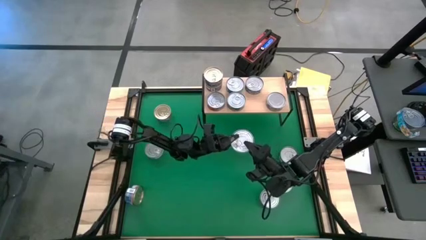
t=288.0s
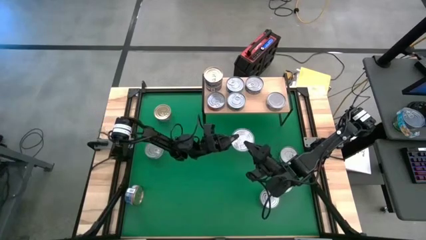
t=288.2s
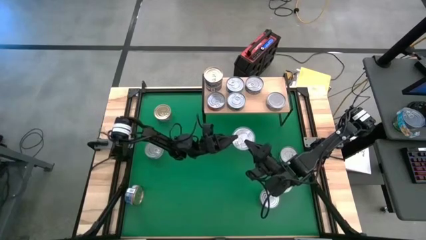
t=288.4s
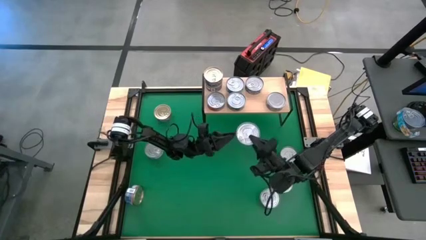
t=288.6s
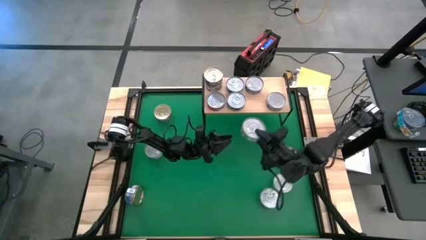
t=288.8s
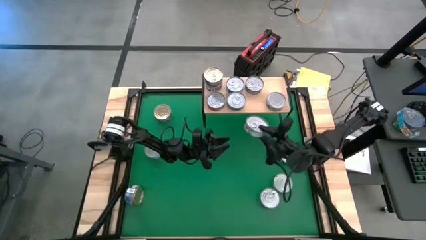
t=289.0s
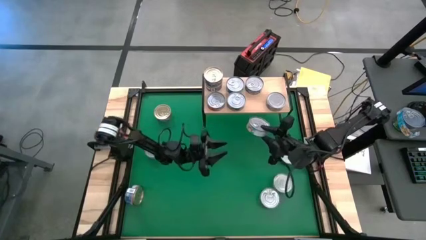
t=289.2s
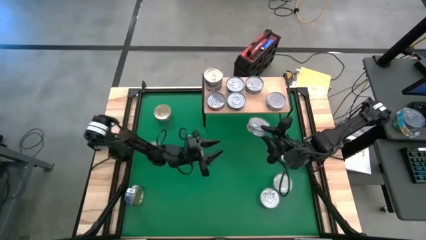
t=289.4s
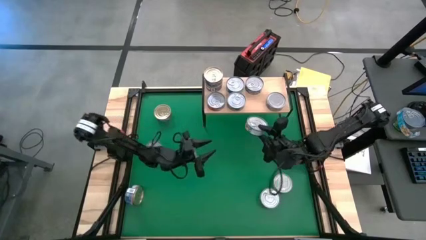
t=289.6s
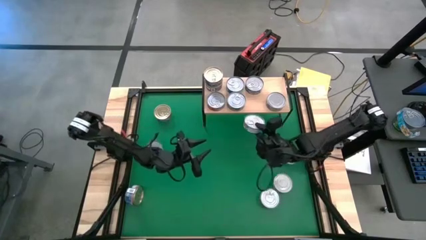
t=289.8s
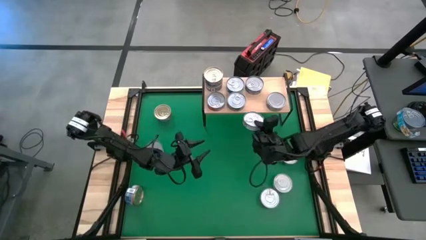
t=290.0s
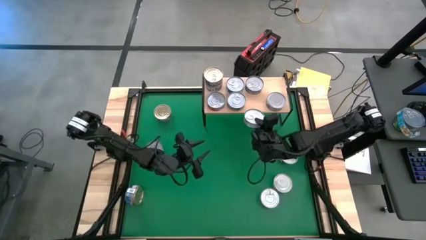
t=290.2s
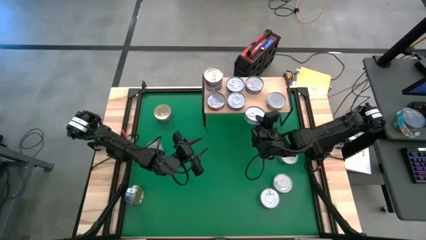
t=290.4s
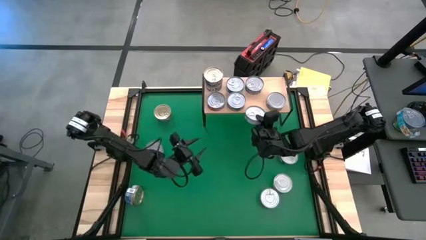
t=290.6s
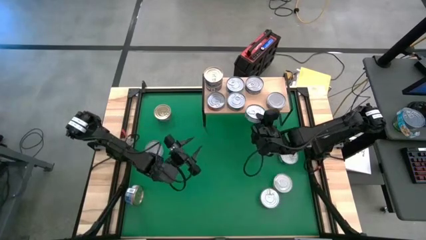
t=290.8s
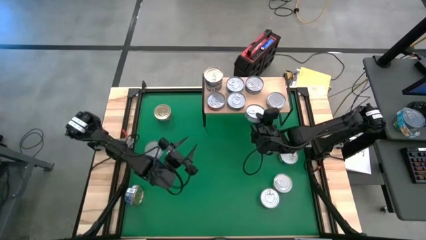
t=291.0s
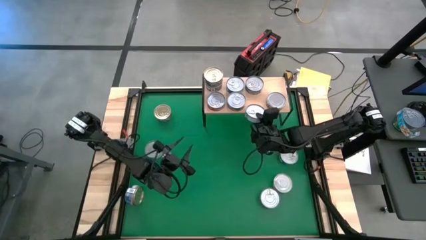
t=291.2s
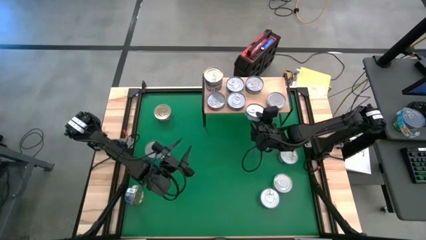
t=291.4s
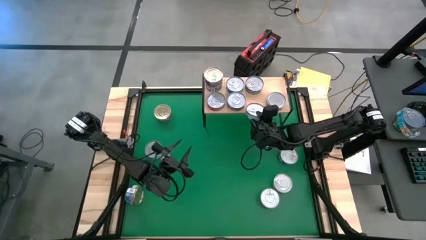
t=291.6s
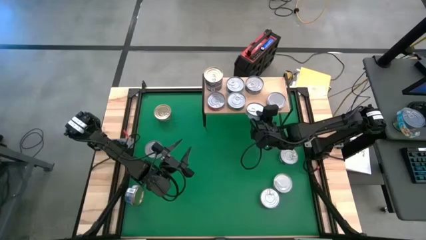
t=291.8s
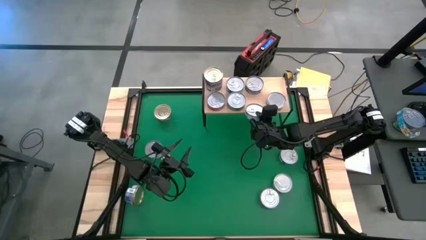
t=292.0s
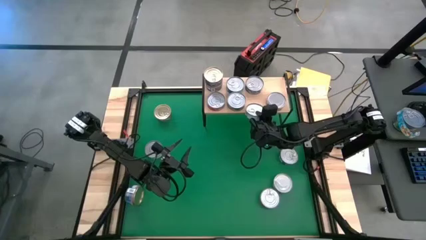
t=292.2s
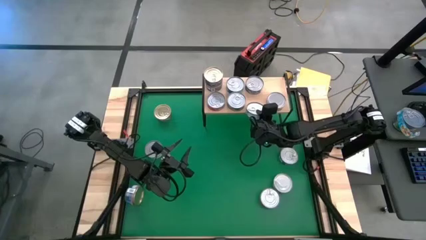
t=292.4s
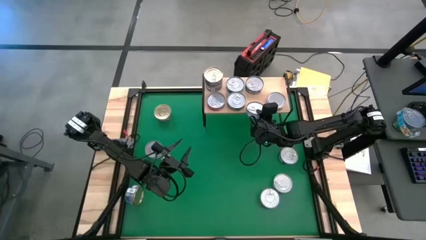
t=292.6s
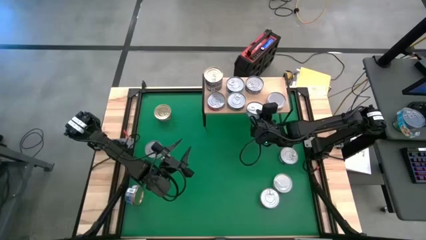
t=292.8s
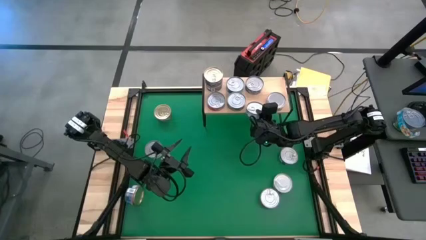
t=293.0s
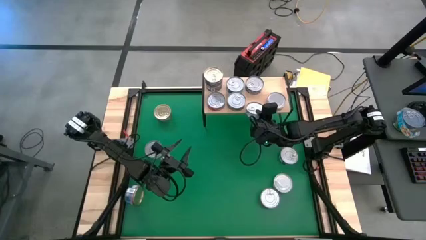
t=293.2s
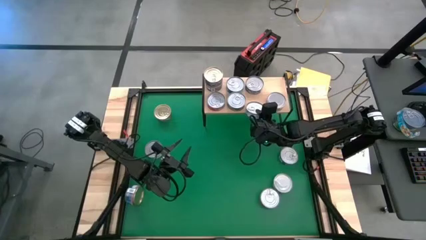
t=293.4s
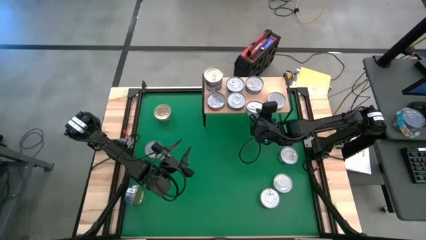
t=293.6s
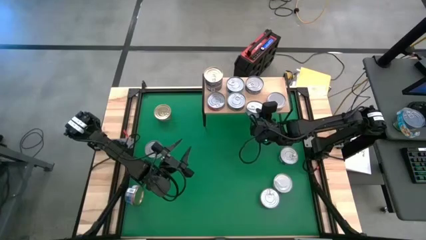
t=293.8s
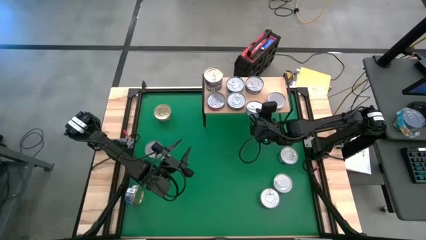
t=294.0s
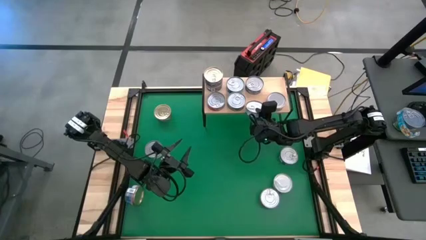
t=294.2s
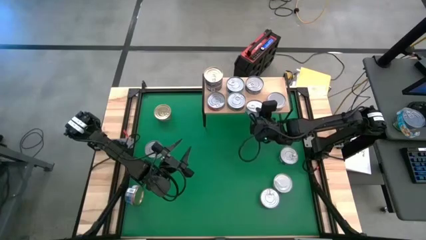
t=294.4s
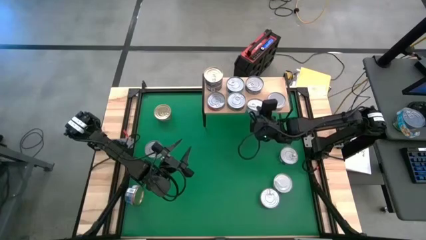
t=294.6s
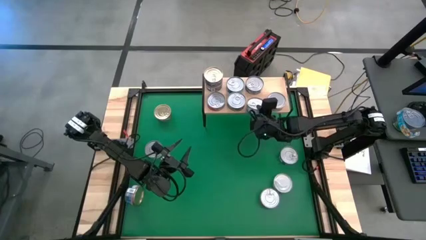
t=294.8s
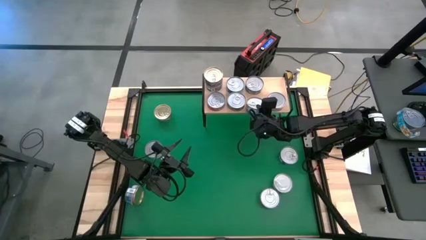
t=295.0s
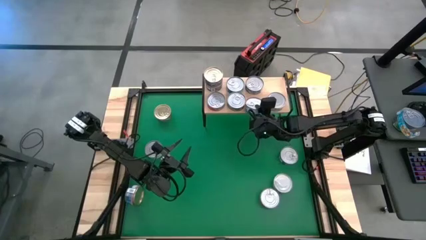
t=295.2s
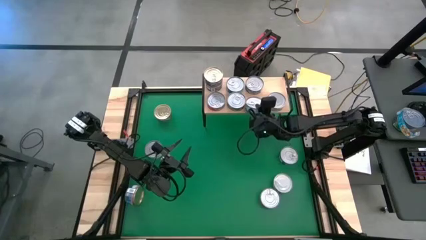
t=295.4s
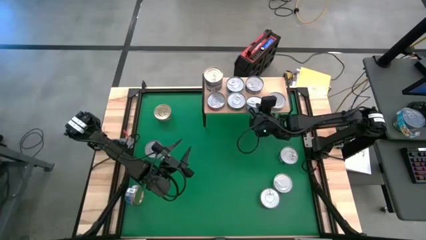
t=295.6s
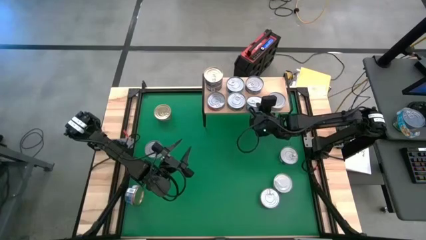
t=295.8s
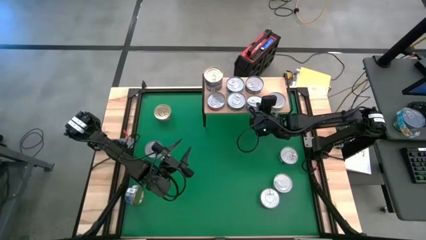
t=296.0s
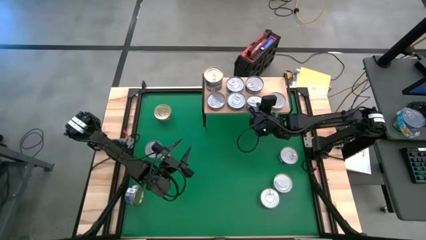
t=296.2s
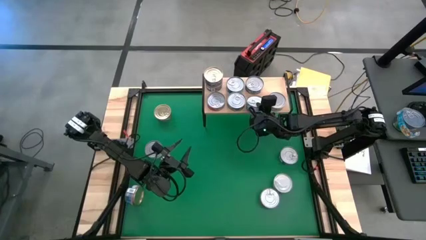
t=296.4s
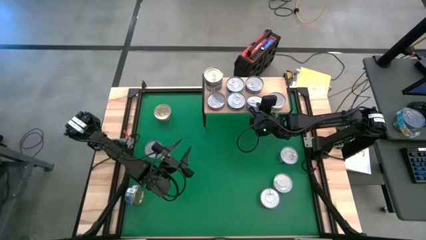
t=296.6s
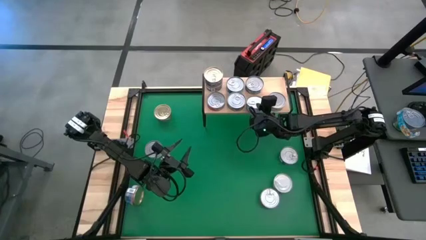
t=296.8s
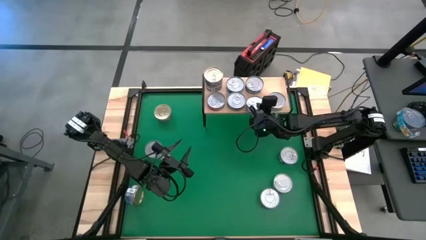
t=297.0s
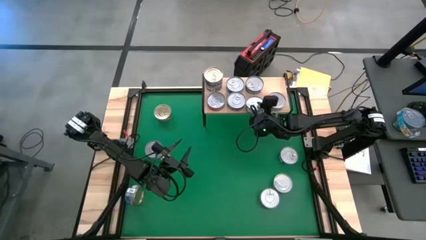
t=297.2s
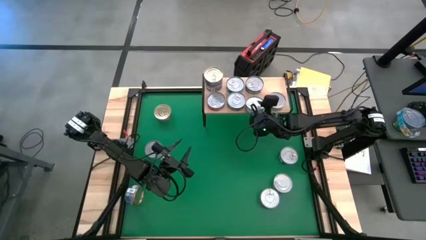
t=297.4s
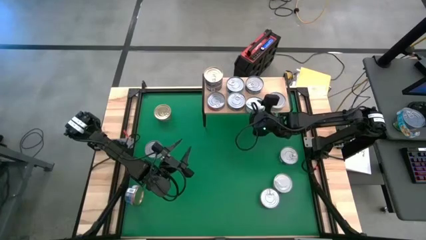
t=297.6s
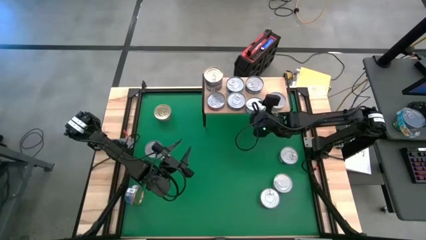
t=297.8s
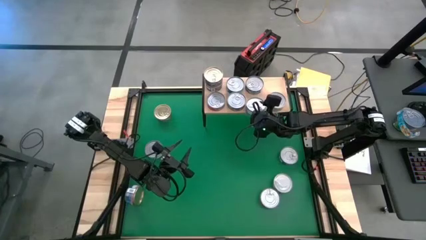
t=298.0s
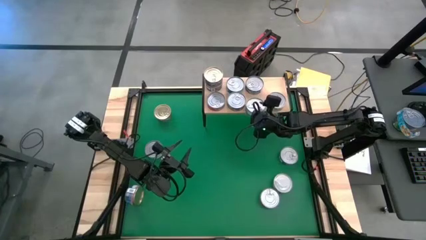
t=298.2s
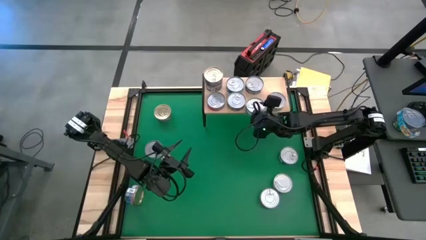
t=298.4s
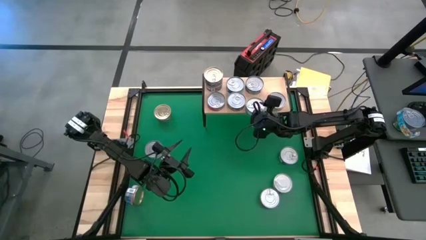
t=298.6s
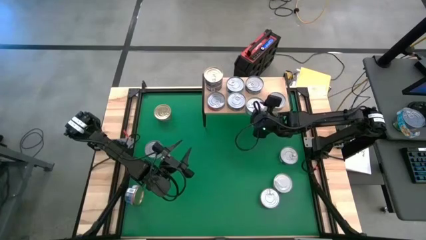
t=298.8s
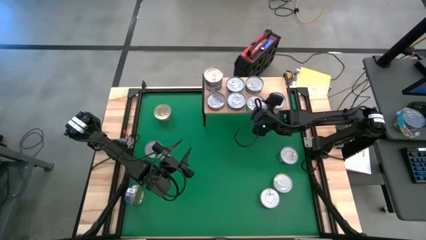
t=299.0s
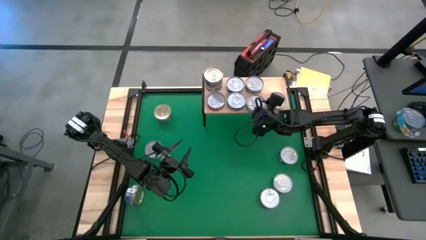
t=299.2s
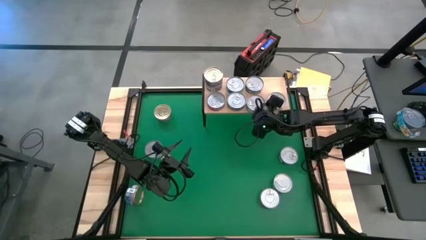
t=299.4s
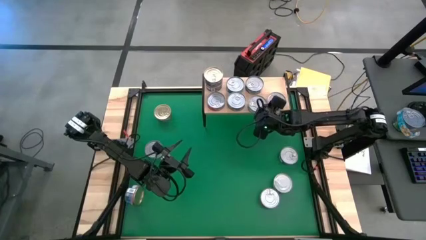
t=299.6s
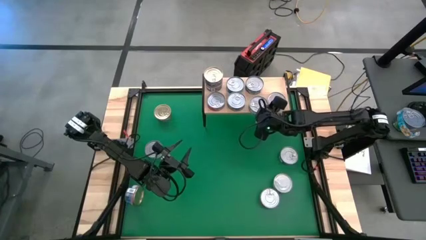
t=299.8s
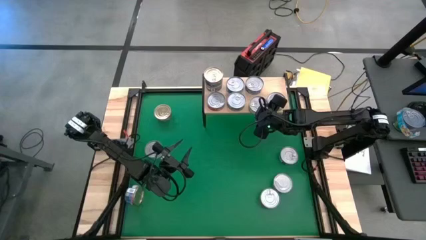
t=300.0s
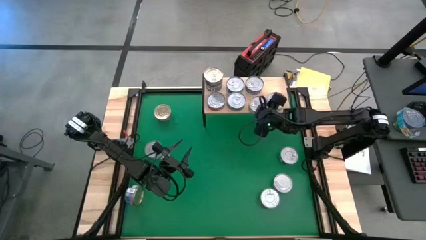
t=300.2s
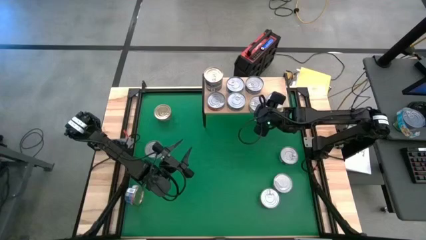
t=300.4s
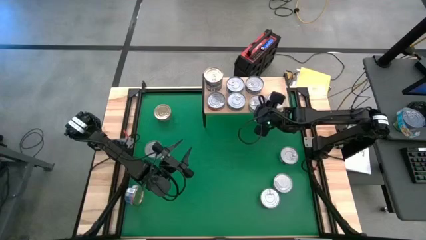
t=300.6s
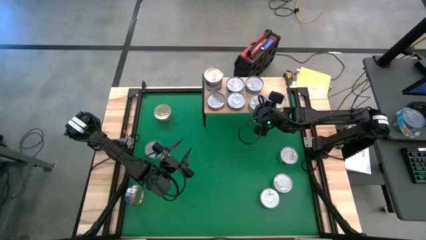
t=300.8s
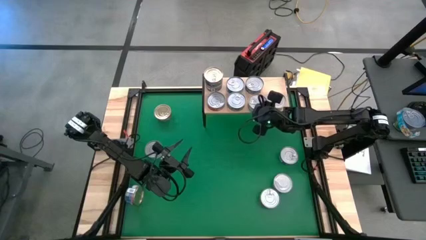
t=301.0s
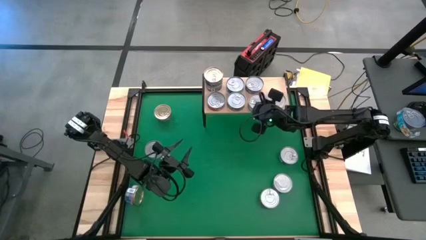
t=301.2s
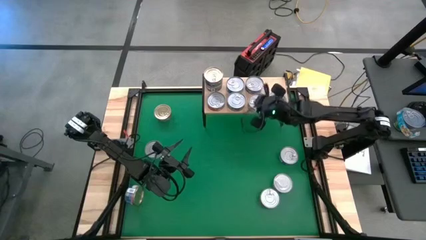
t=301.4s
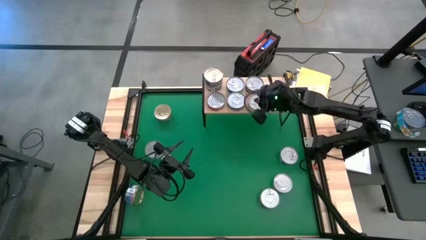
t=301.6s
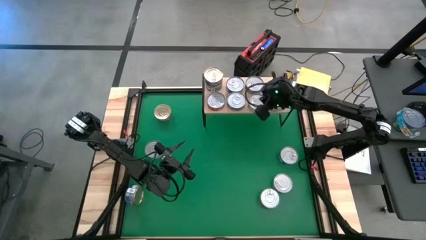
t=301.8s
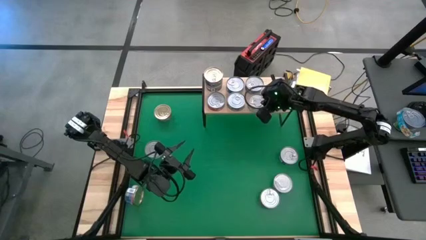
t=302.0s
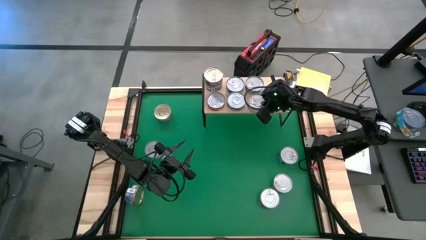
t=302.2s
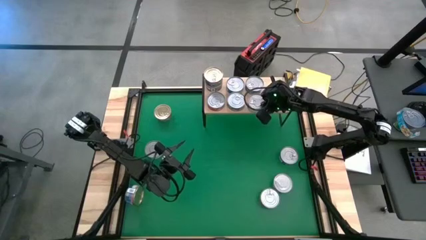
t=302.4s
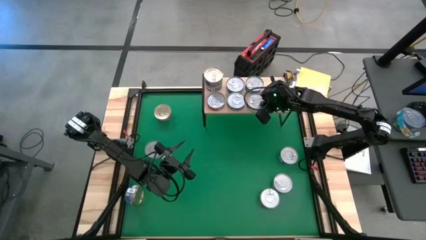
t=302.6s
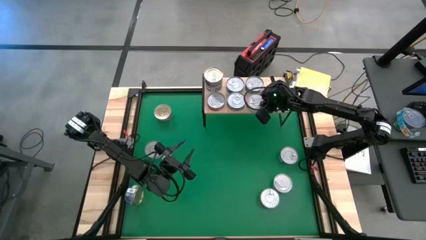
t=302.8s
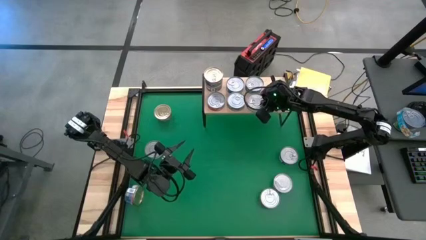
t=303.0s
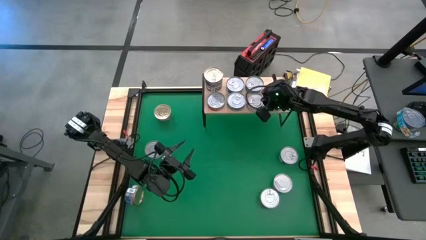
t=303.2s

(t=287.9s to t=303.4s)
Task: Stack canned seafood by type on shelf
Put the yellow/blue tuna can on the shelf
